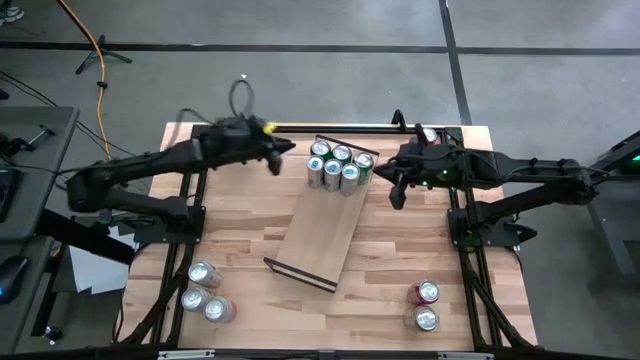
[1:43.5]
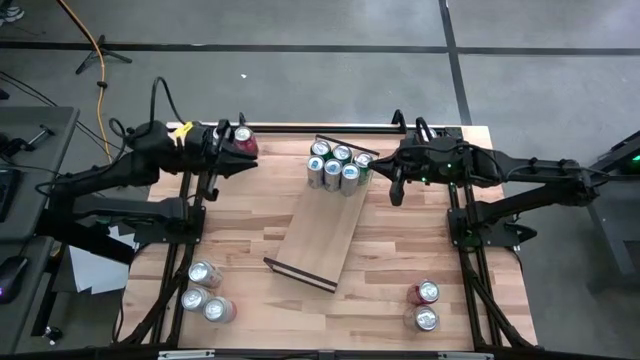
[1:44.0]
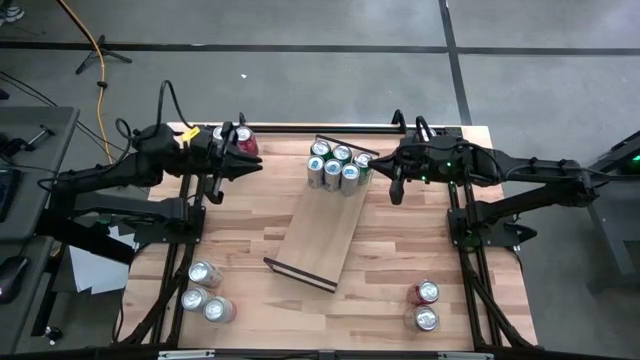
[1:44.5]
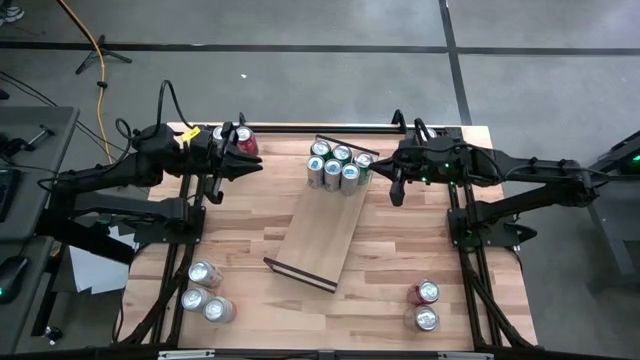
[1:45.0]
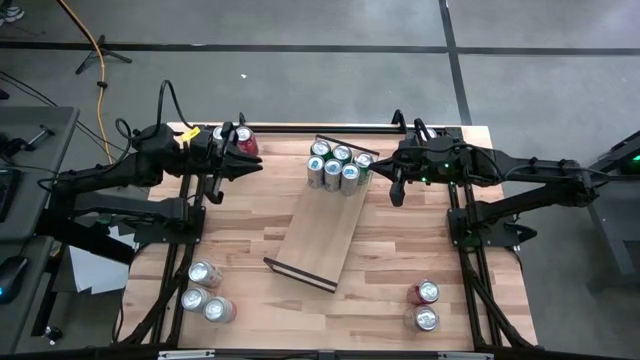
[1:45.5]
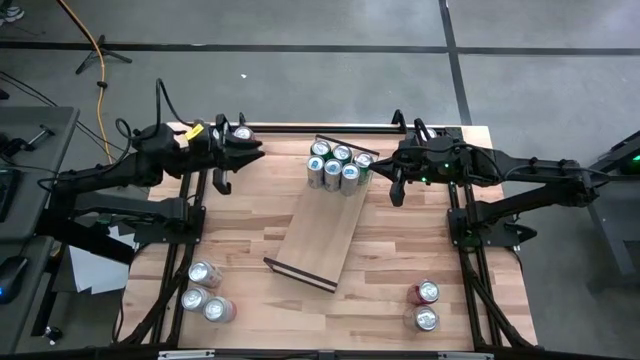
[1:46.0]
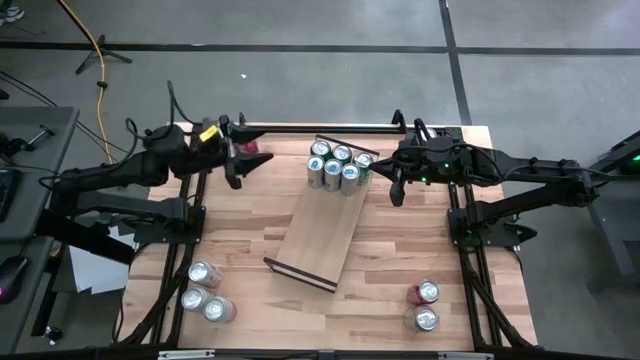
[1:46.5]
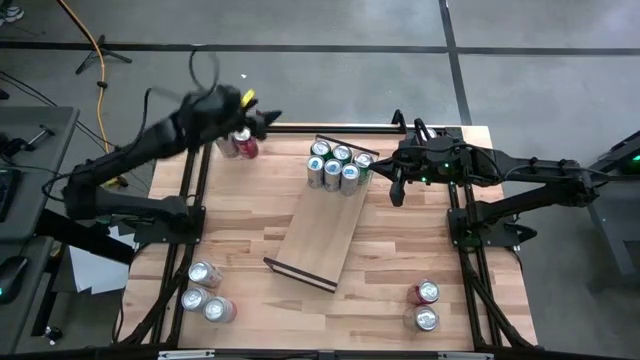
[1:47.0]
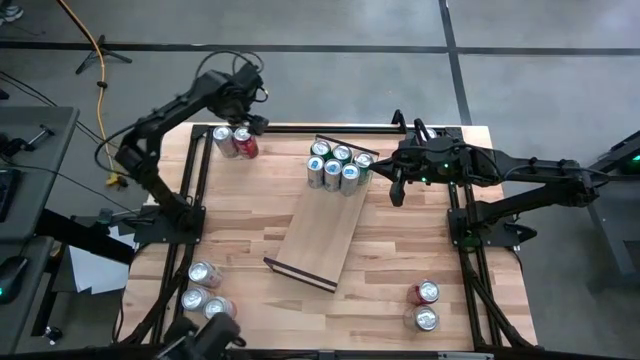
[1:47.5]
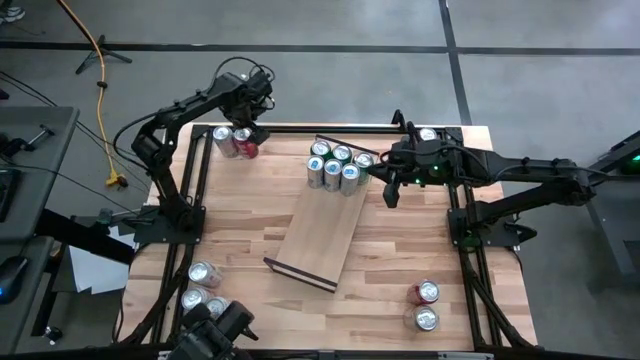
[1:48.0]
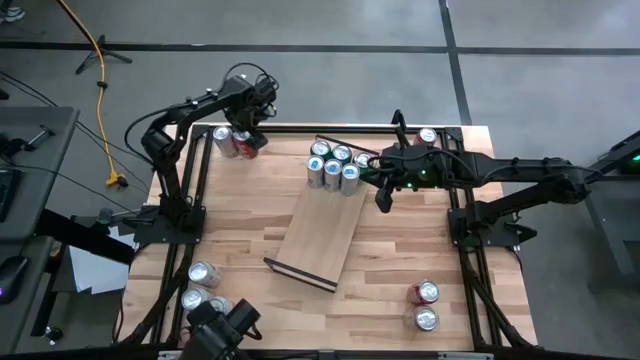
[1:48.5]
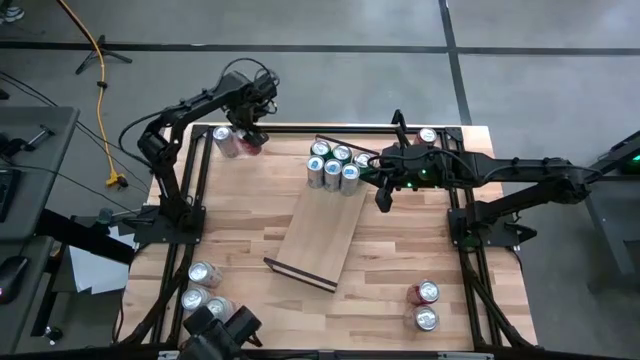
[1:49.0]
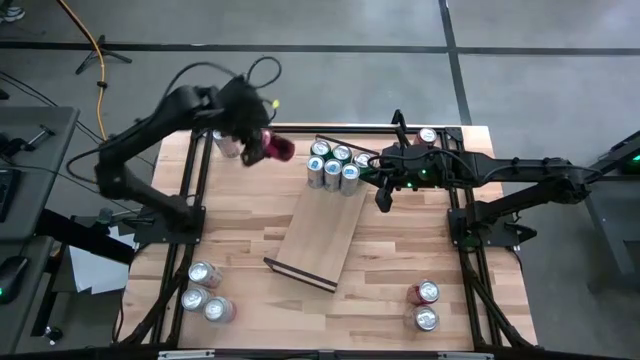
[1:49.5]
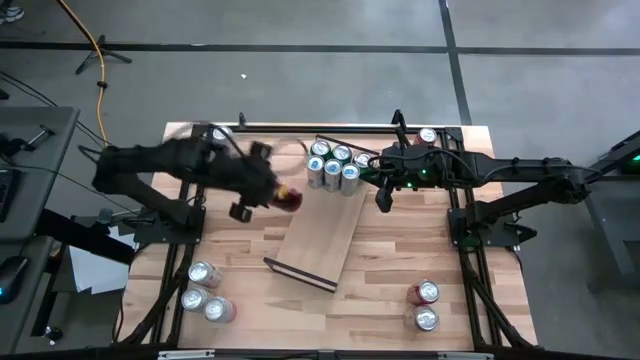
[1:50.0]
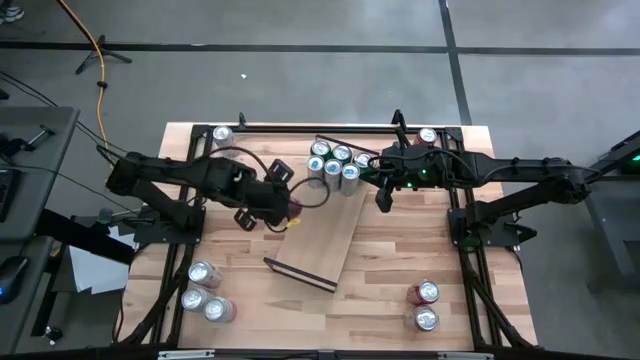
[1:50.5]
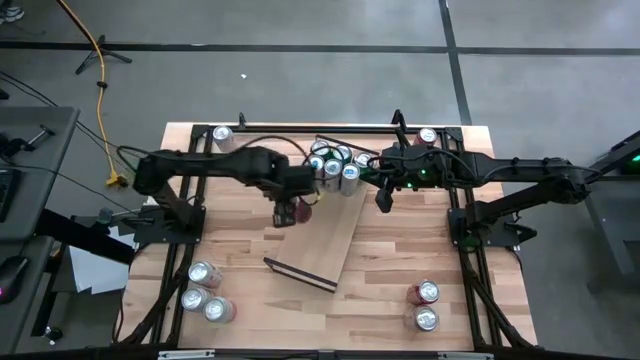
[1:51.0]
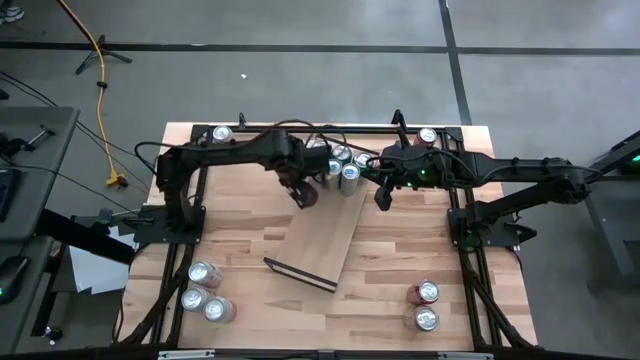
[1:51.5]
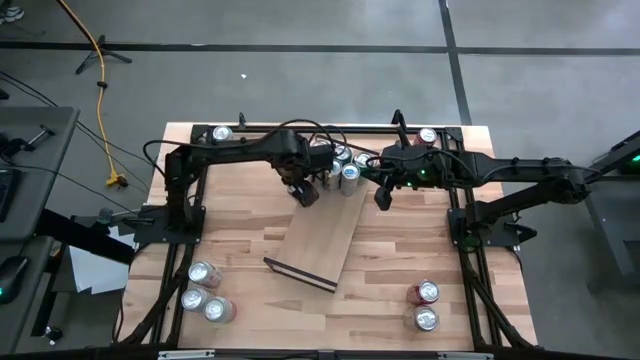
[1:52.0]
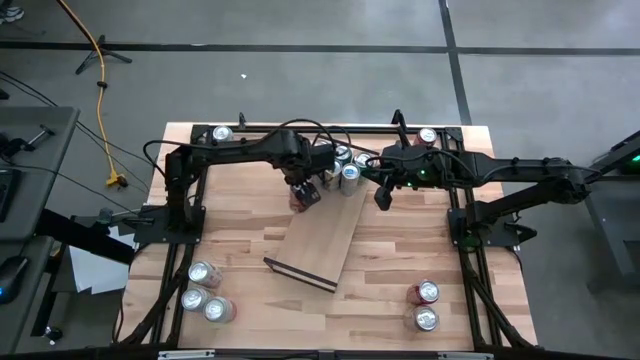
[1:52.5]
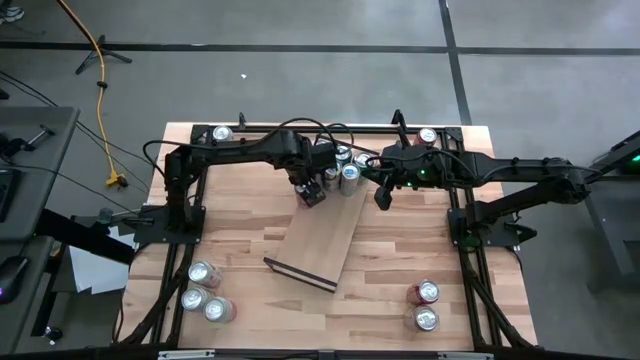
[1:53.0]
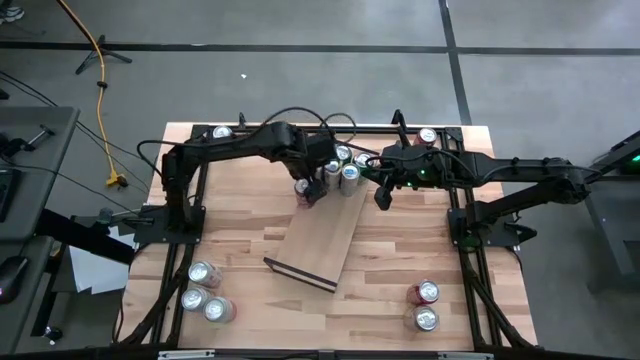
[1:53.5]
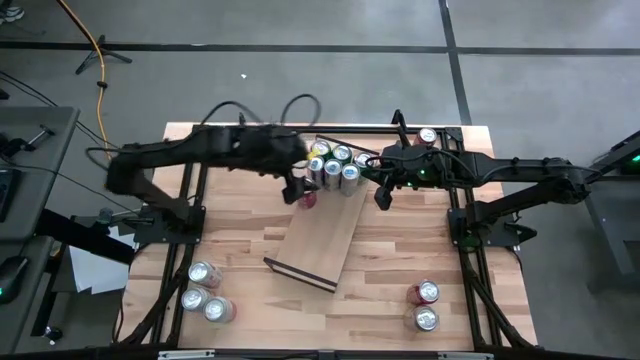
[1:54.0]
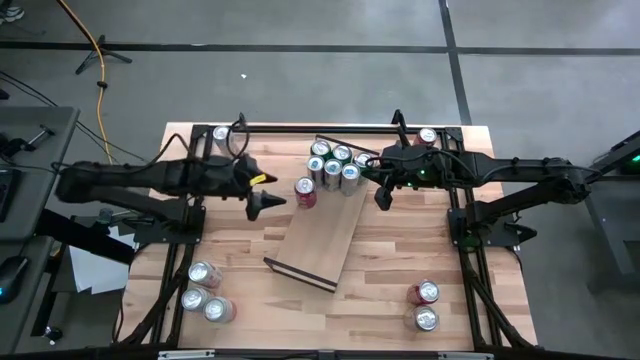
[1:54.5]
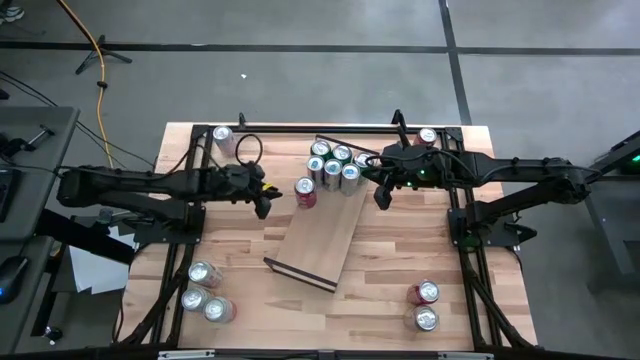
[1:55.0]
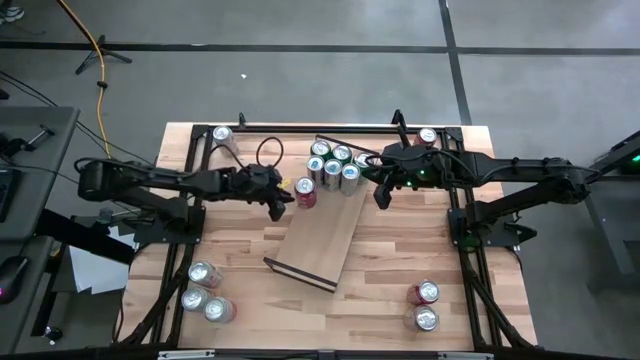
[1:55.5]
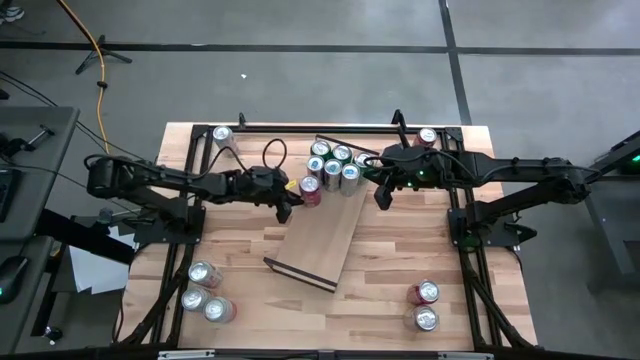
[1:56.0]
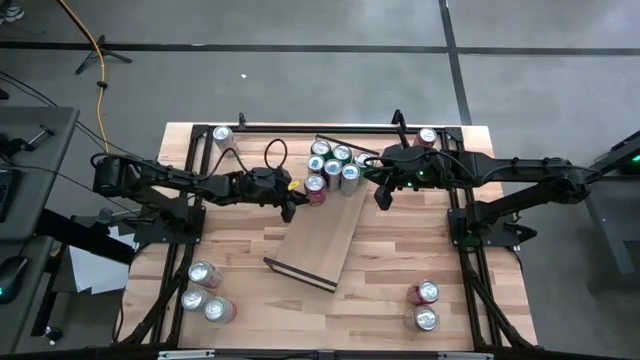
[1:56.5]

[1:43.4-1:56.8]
Task: Place canned beverage on shelf
Put the top left red soda can on the shelf

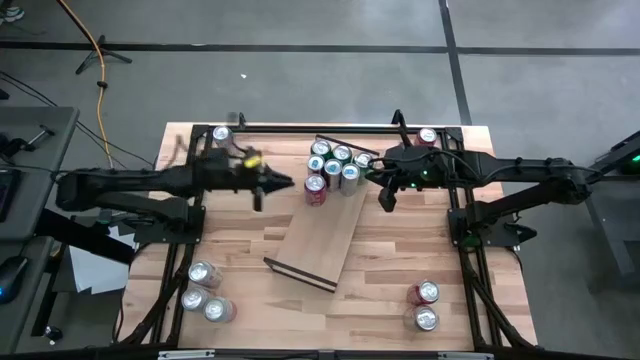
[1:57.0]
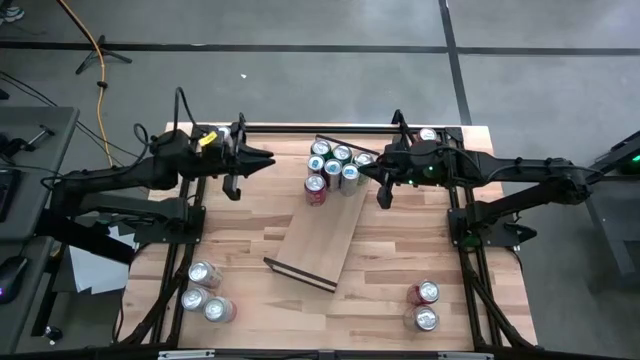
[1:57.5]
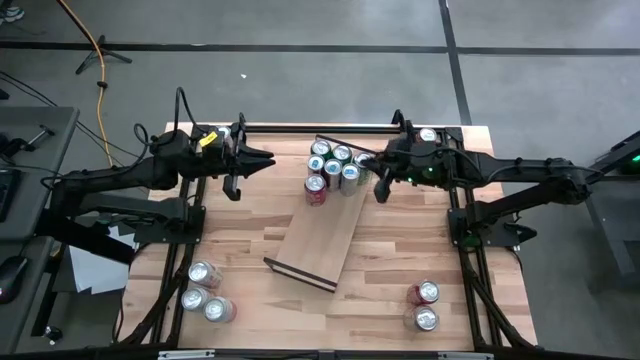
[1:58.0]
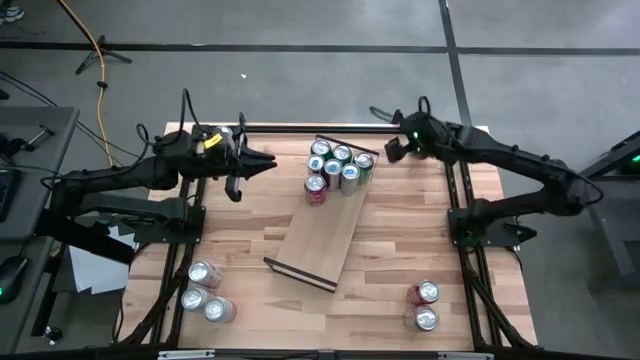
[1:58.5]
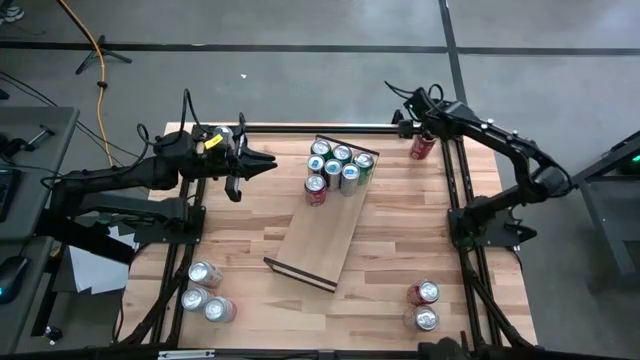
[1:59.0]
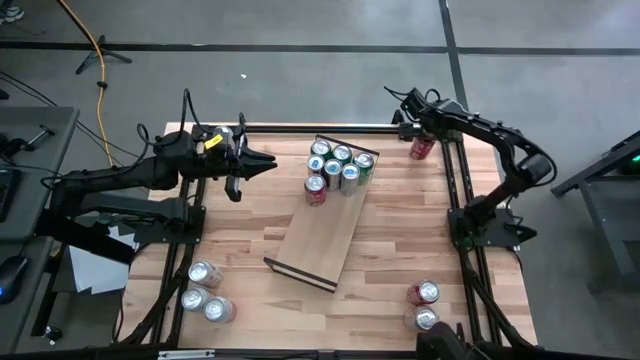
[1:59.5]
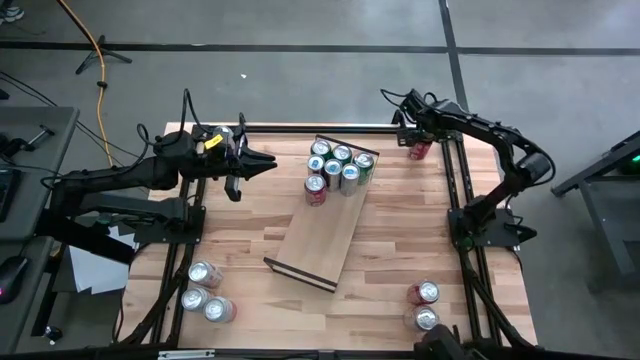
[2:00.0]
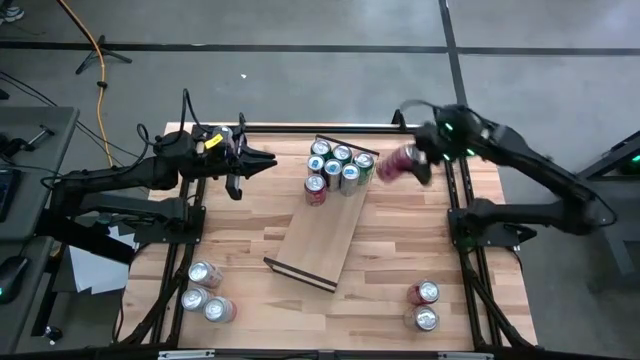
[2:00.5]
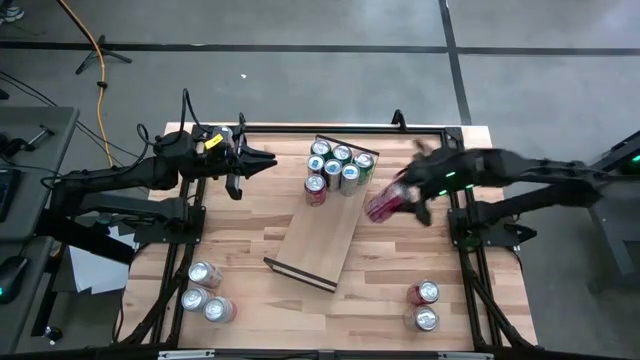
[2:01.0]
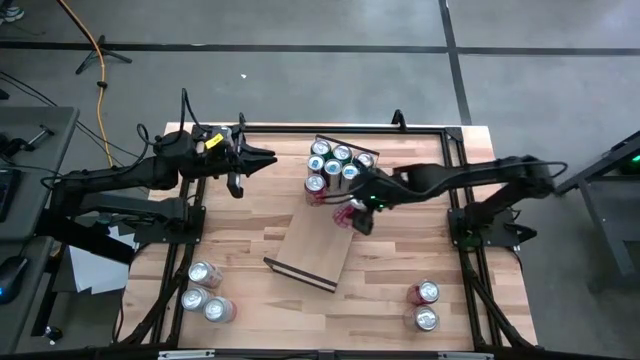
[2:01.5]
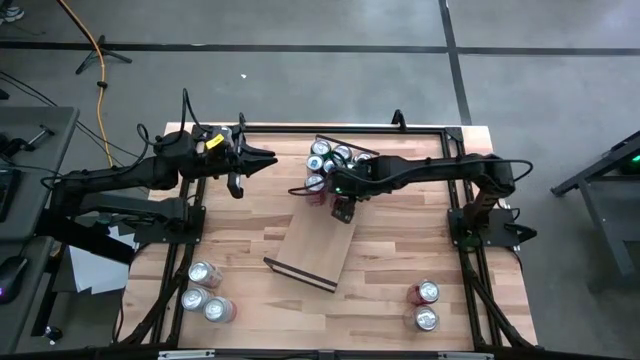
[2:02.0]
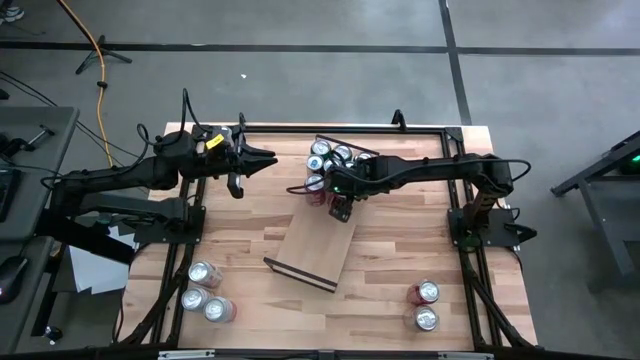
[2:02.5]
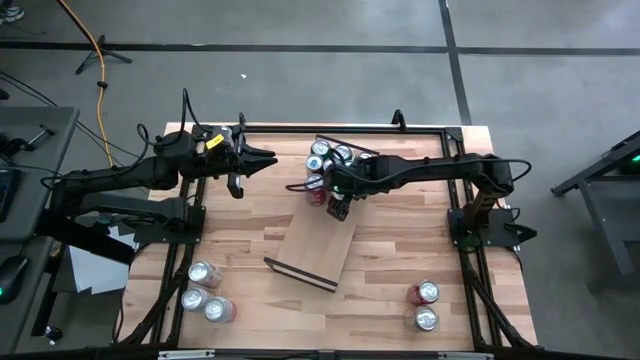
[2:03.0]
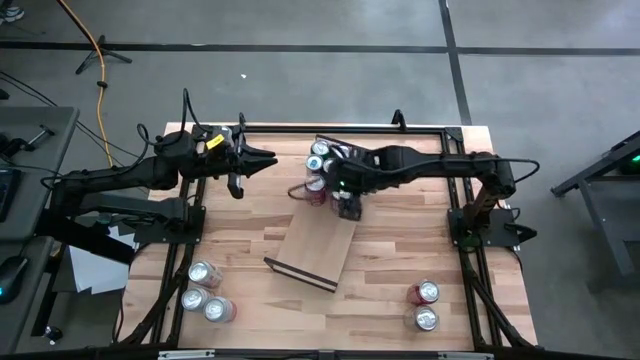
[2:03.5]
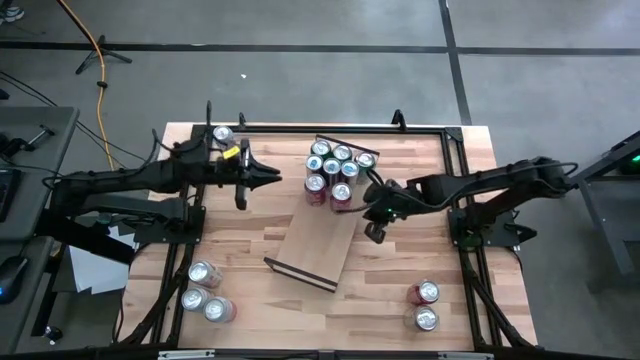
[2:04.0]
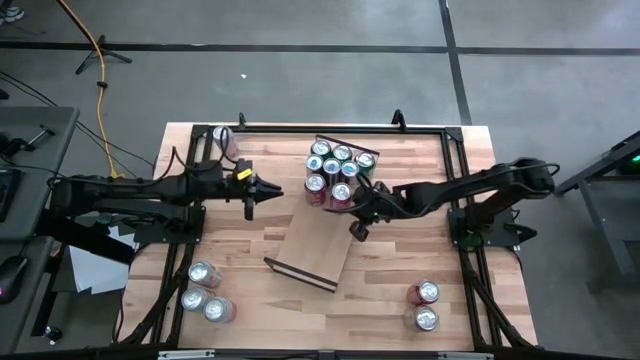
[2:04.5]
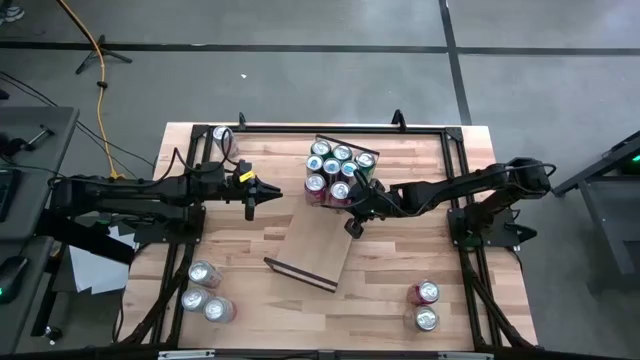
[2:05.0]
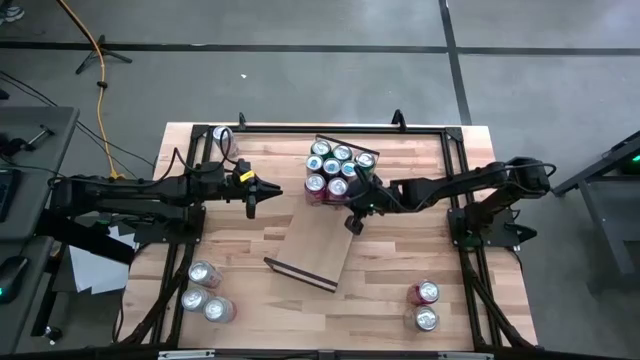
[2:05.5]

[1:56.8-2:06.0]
Put the top red soda can on the shelf aligned with the other red soda can
